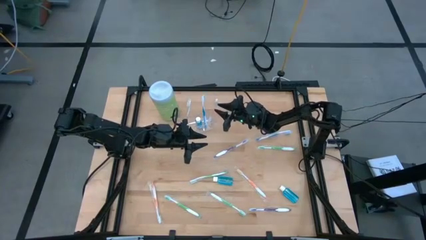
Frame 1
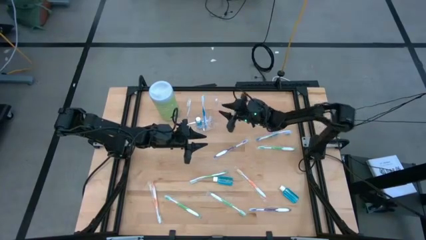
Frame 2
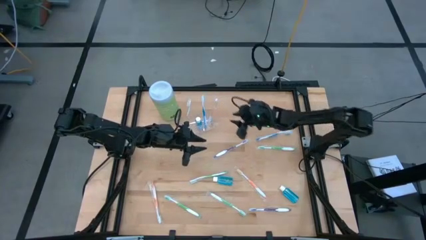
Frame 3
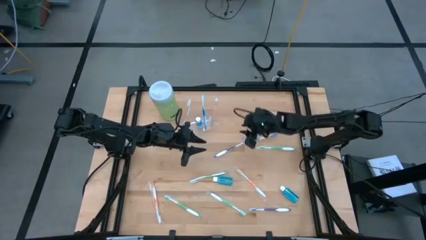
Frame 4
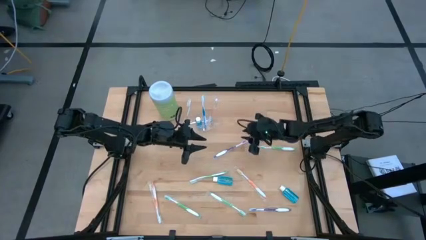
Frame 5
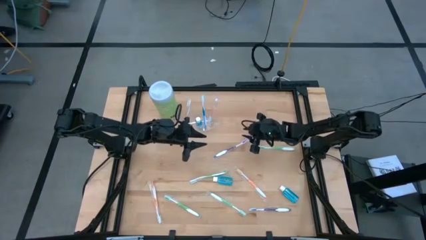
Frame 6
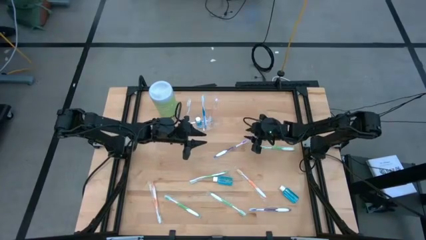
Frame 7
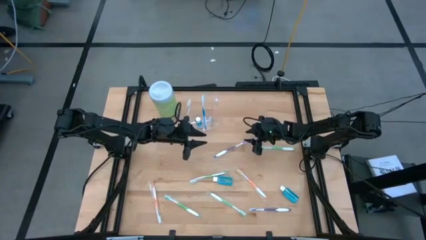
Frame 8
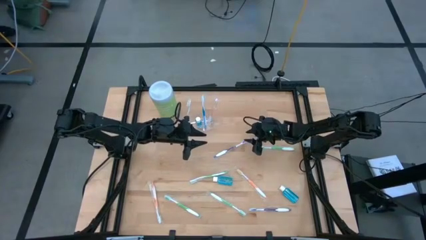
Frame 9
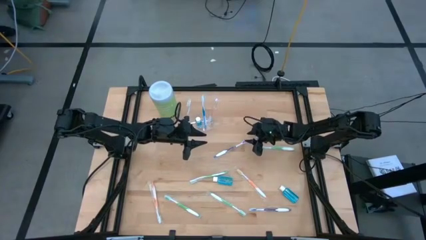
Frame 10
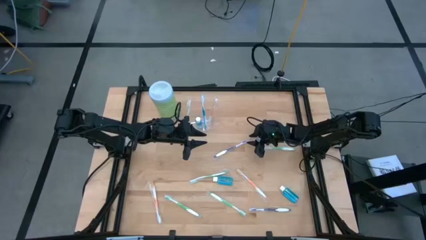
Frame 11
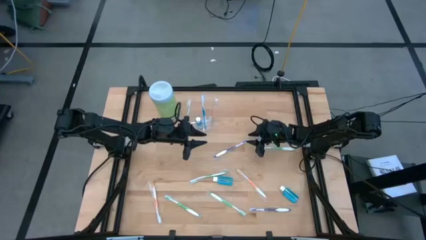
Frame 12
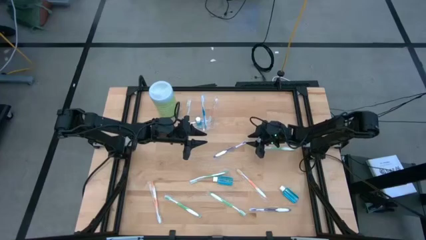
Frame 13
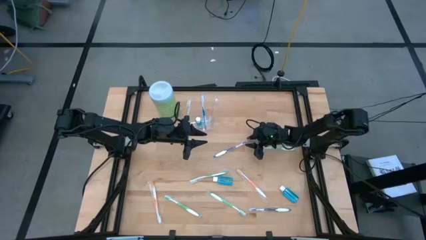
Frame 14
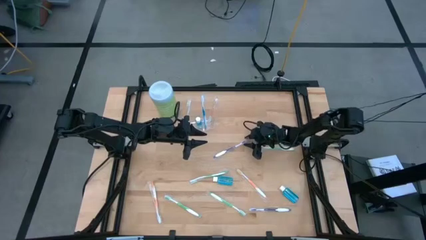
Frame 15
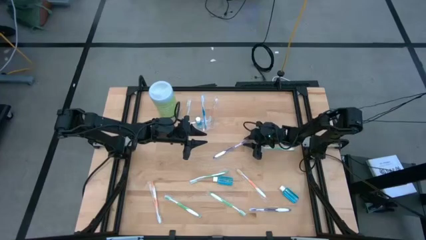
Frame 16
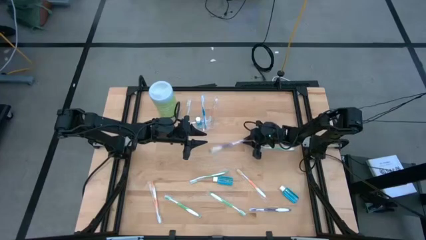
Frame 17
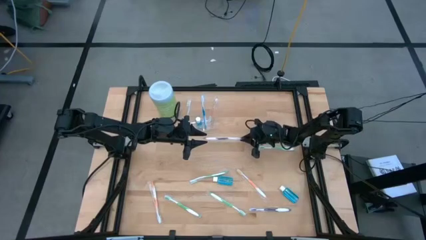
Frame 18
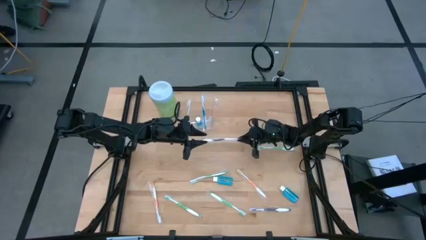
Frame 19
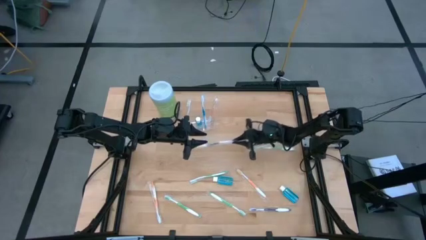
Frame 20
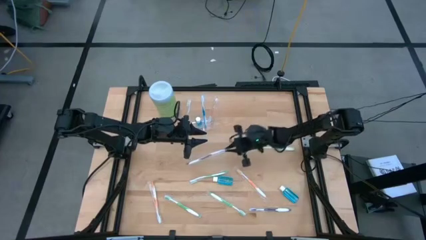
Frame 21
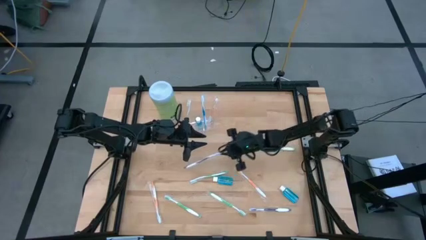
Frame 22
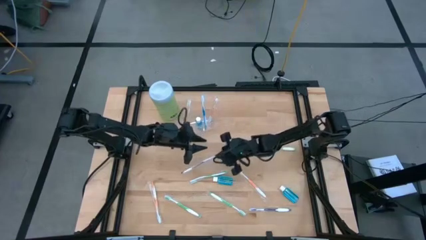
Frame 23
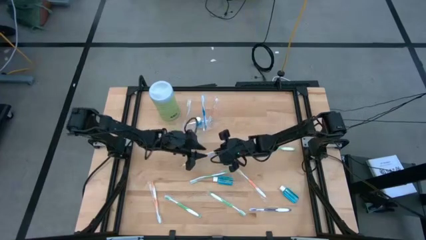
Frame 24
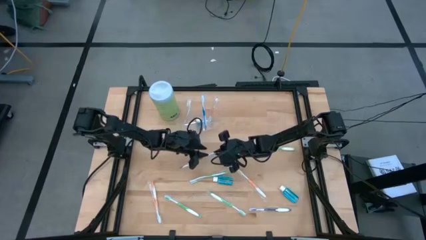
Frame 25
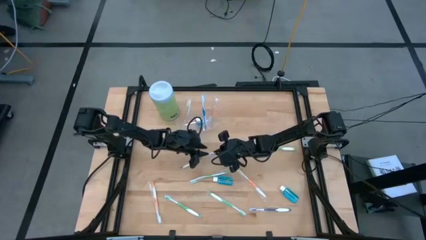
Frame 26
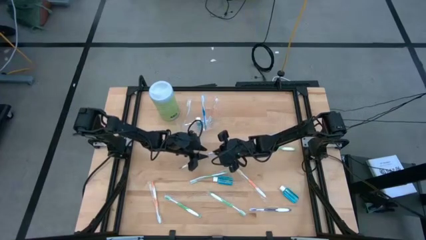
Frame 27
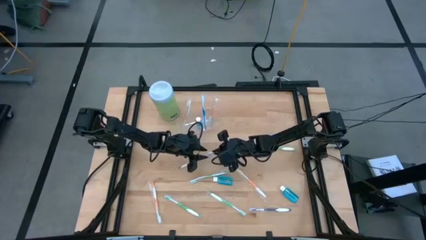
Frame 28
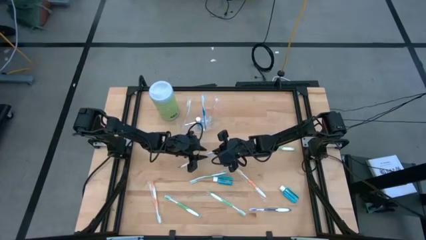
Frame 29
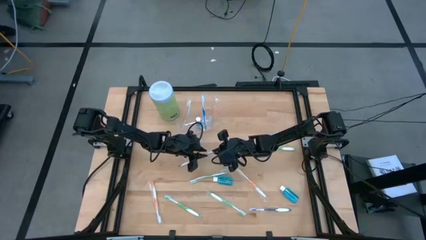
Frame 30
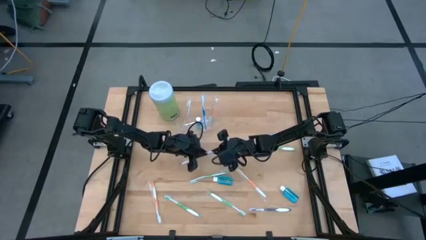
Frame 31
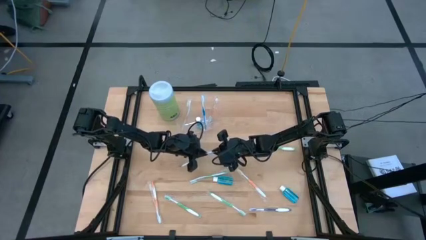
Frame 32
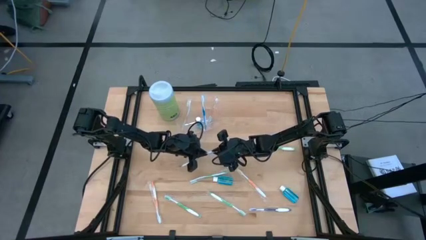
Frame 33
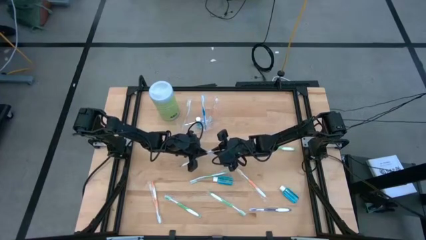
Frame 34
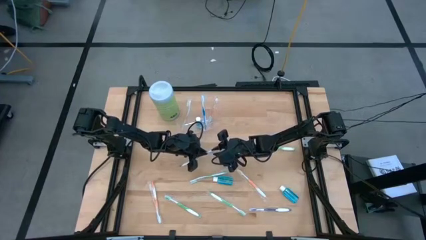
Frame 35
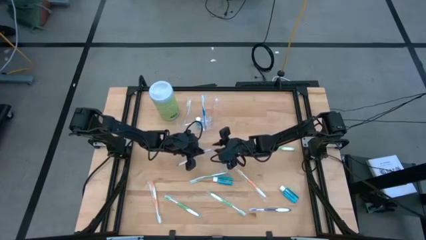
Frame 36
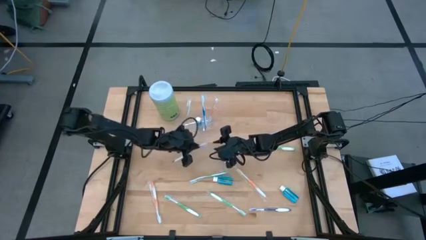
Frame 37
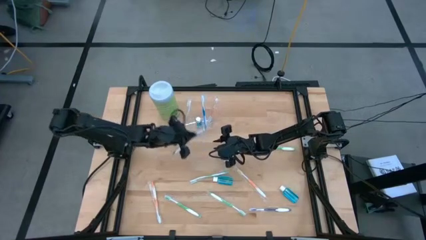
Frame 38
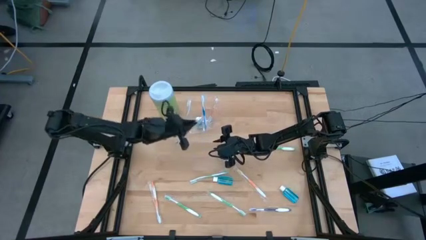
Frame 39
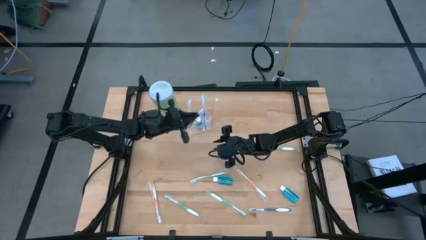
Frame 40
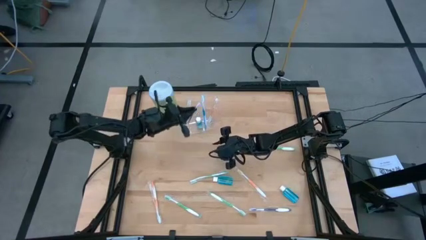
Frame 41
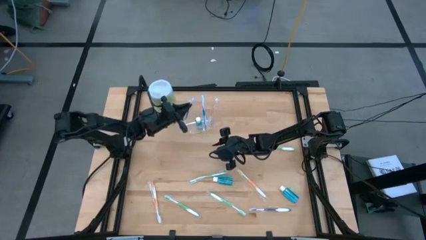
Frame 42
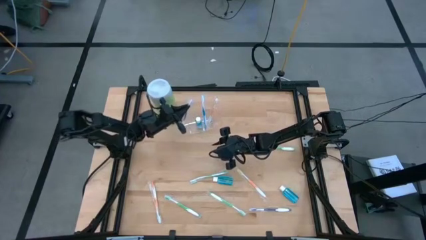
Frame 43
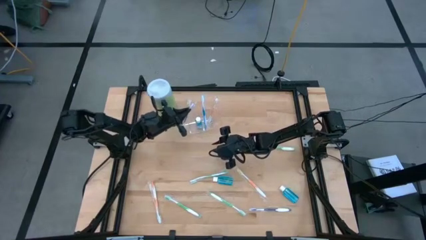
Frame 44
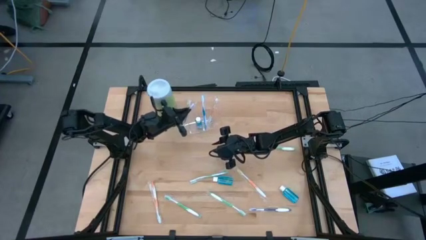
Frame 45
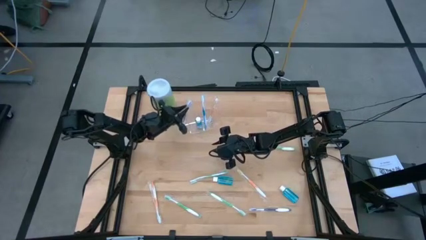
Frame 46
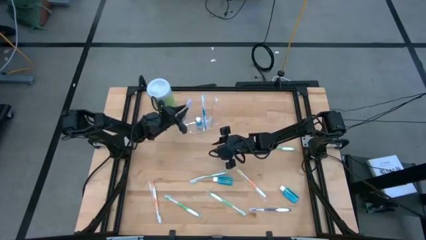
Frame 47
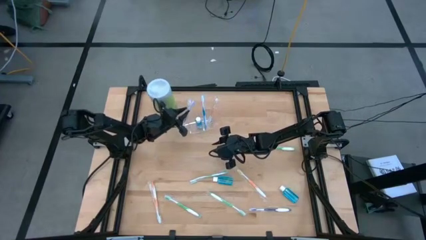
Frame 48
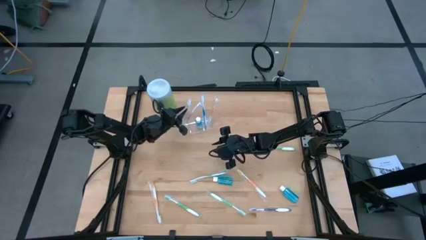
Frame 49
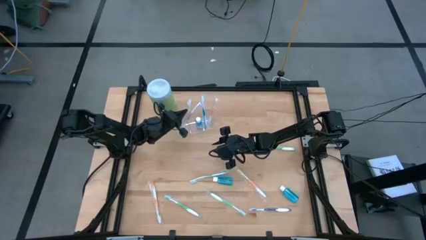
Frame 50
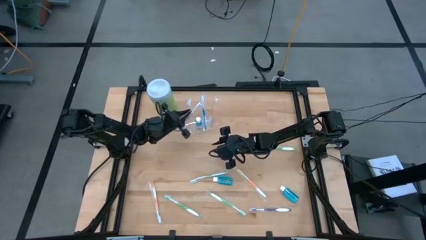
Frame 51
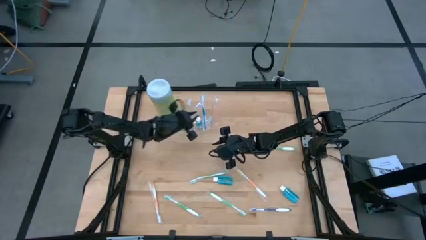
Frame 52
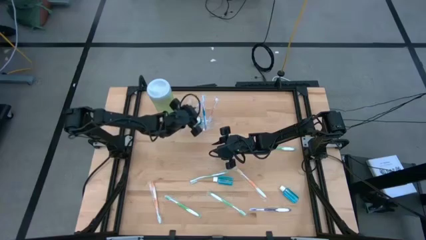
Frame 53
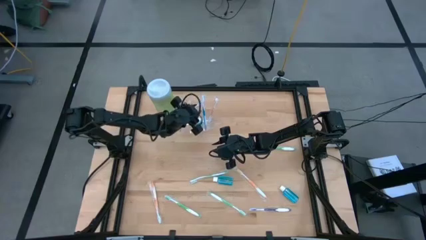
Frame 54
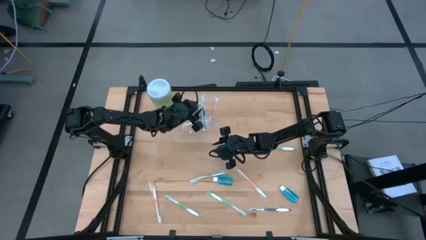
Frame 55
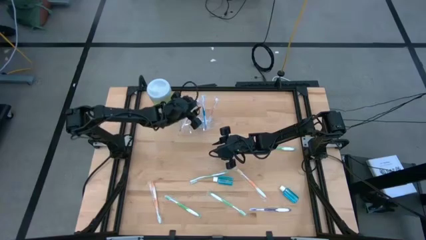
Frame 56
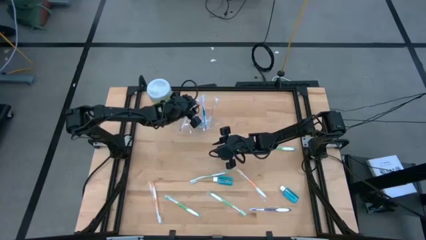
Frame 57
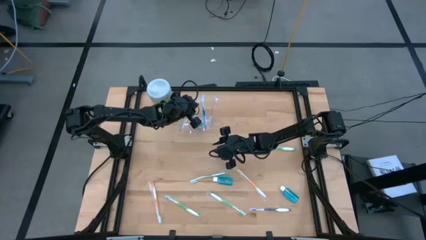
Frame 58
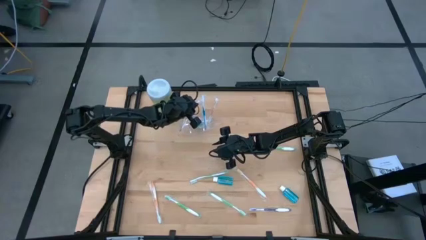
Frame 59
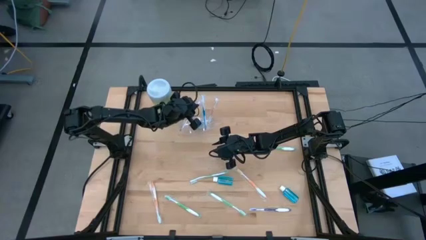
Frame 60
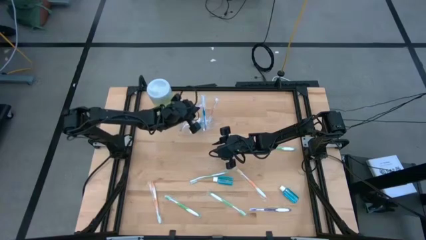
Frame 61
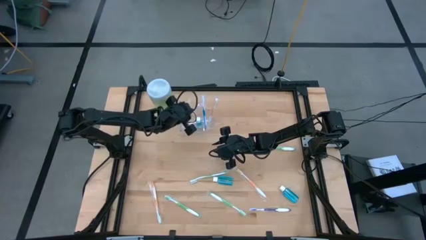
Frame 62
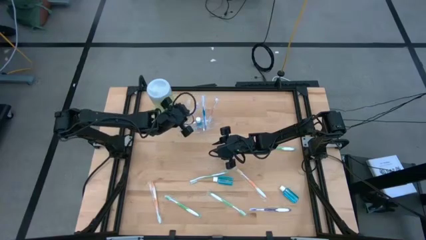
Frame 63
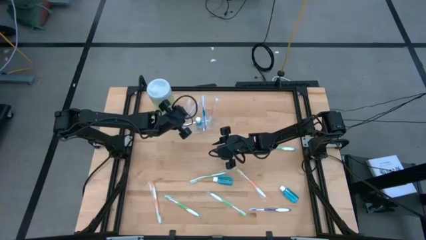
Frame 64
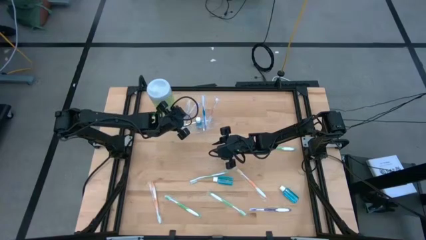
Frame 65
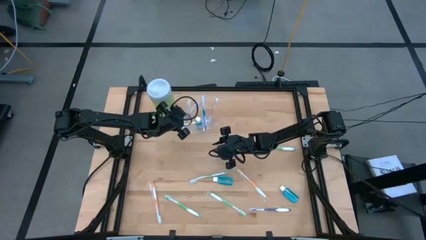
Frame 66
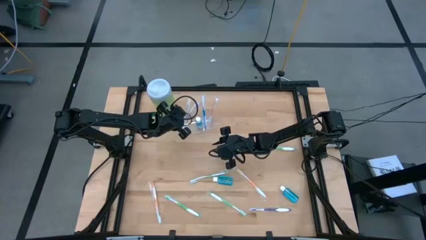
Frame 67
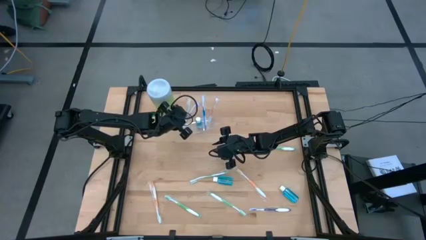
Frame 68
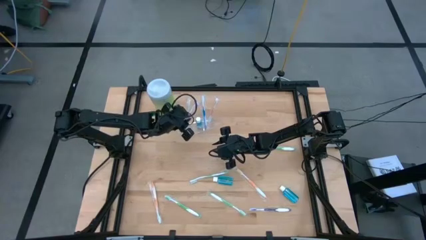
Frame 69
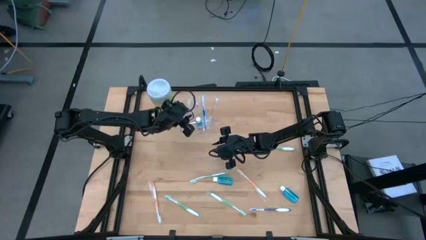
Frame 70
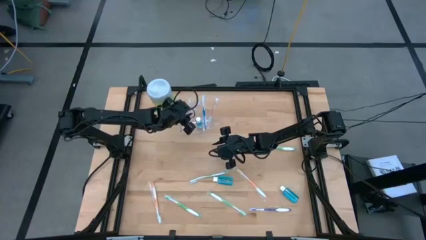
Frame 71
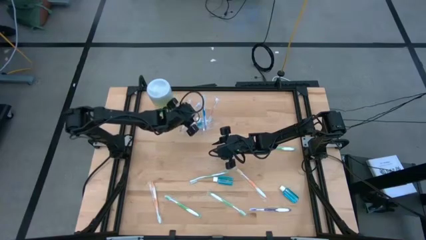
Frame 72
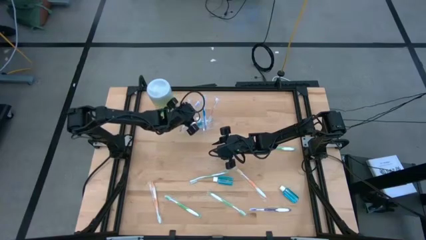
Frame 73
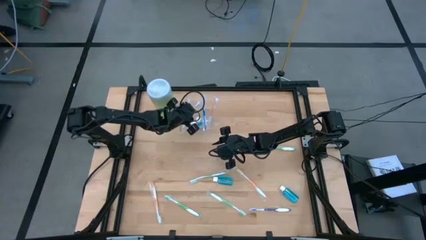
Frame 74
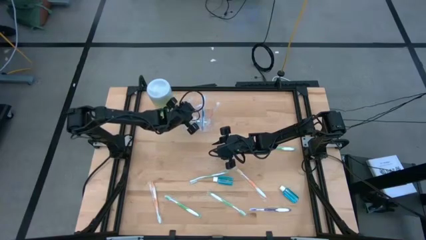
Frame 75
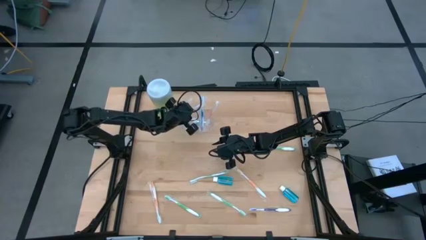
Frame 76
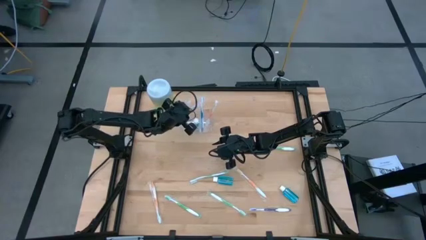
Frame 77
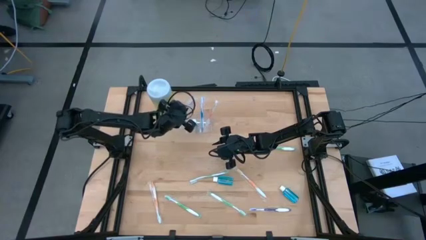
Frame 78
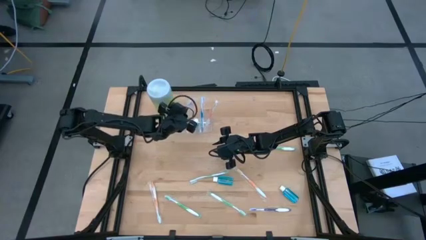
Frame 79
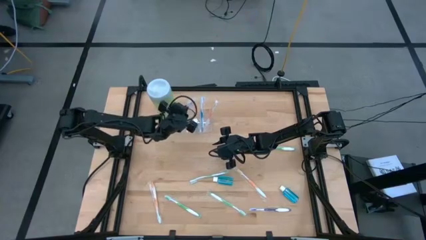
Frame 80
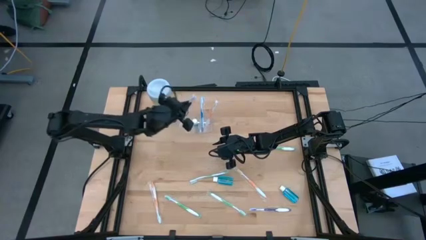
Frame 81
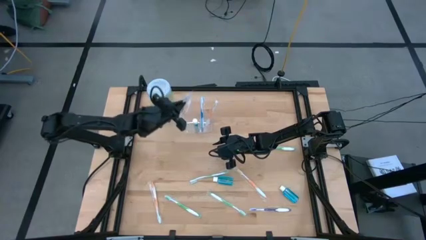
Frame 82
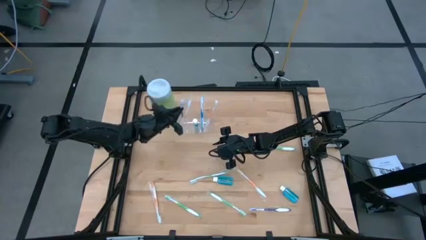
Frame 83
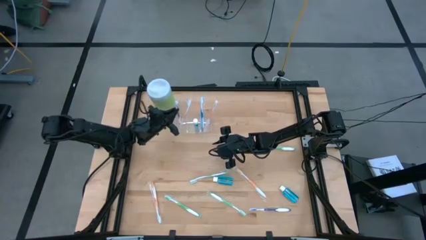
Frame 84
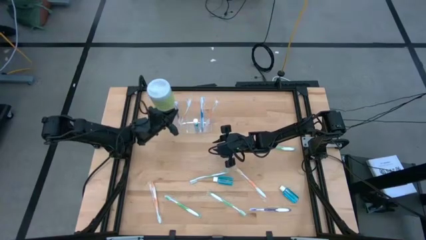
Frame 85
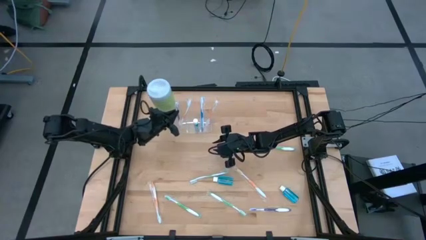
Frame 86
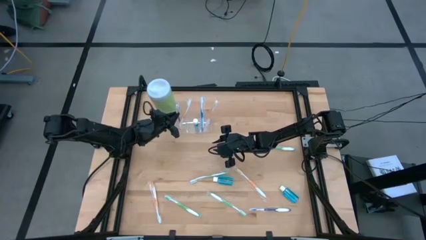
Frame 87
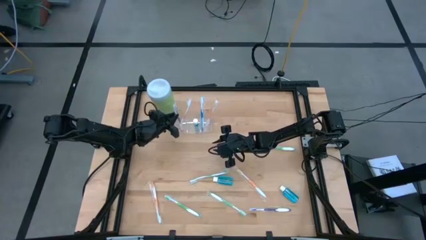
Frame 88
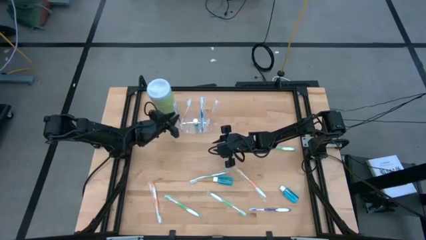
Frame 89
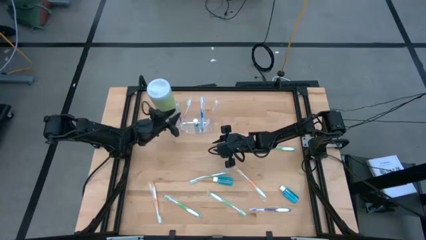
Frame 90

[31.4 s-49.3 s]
Task: Pick & Place toothbrushing station
Put the purple toothbrush into the transparent organizer
